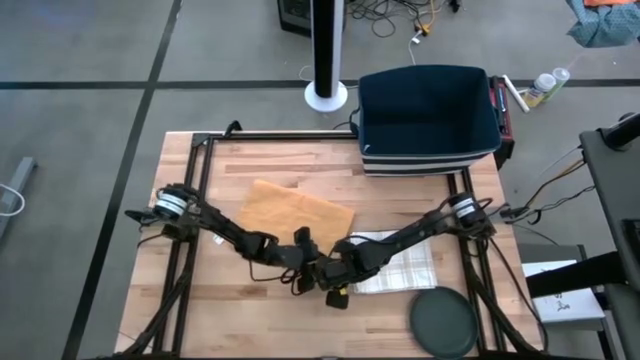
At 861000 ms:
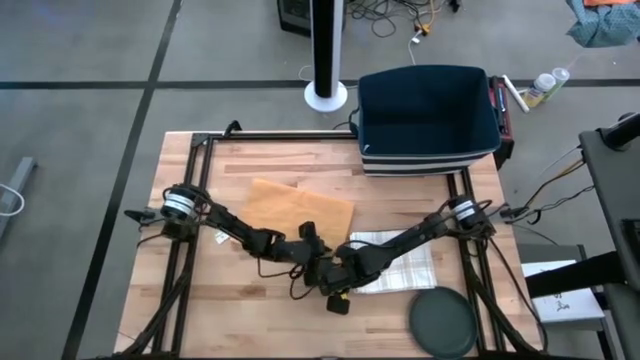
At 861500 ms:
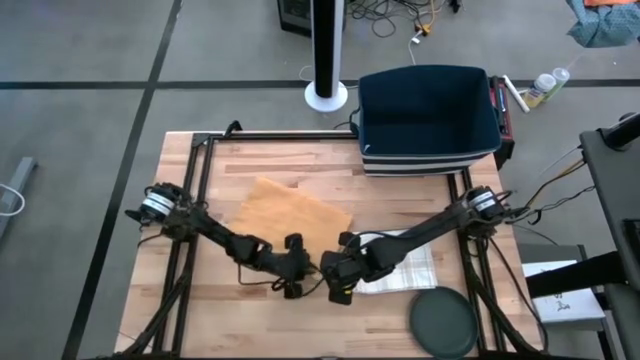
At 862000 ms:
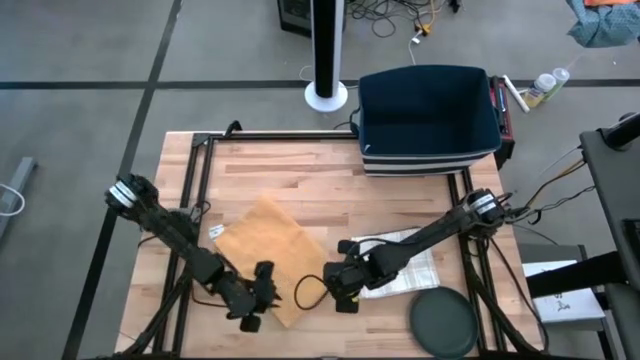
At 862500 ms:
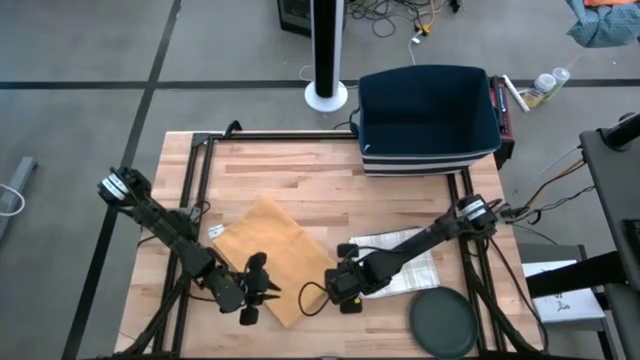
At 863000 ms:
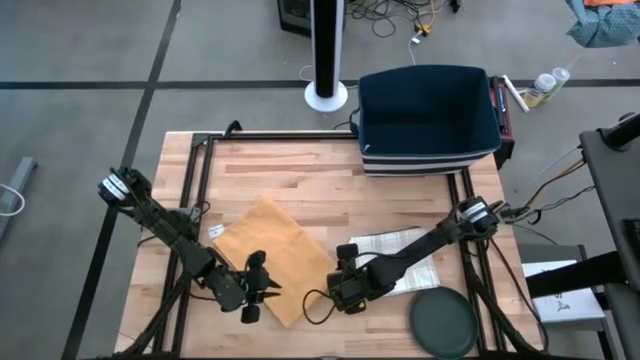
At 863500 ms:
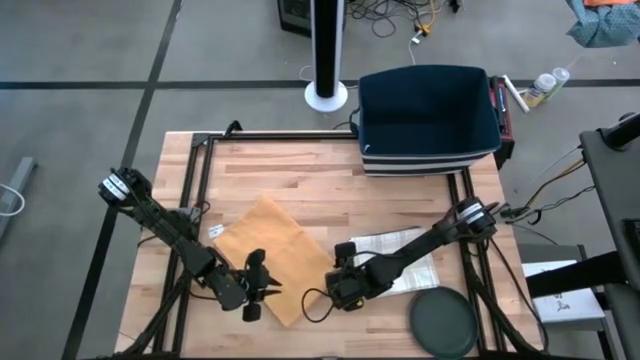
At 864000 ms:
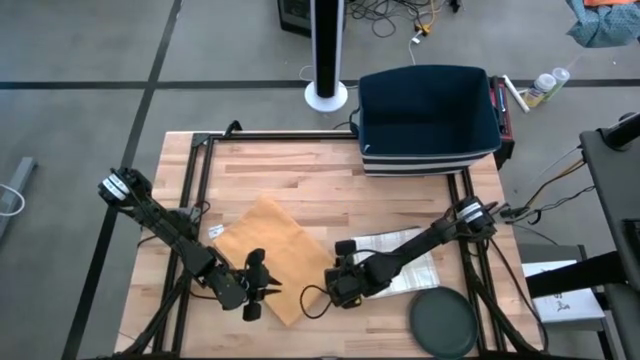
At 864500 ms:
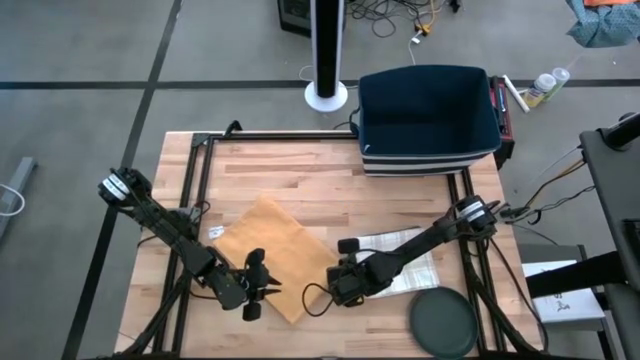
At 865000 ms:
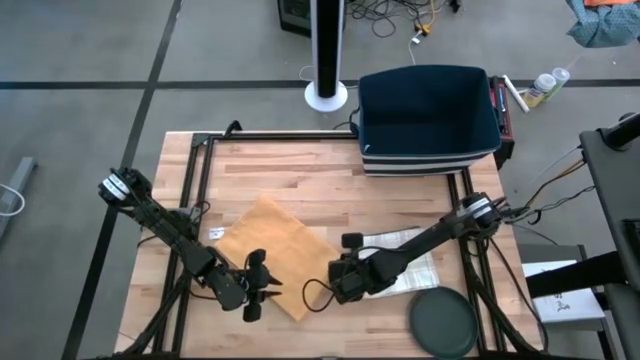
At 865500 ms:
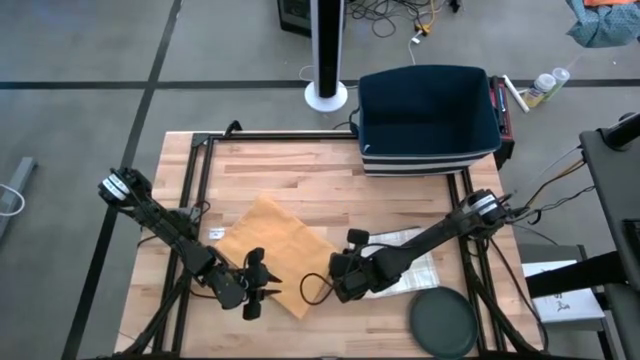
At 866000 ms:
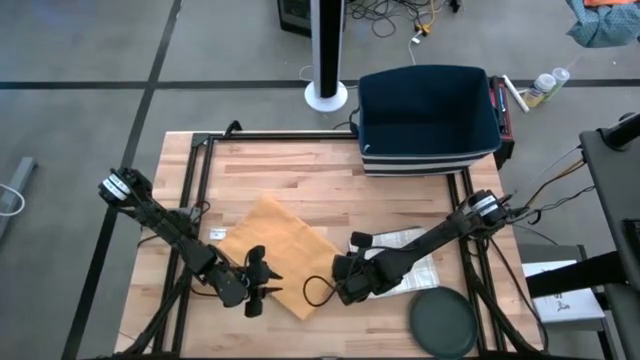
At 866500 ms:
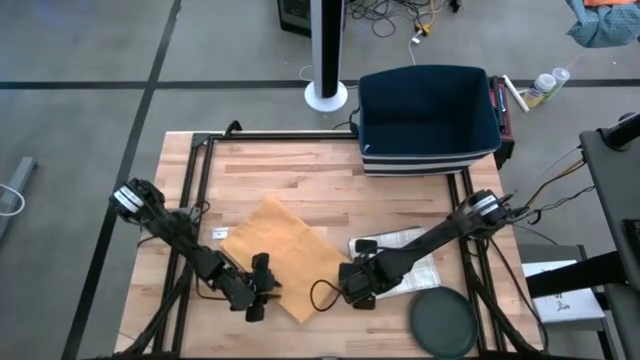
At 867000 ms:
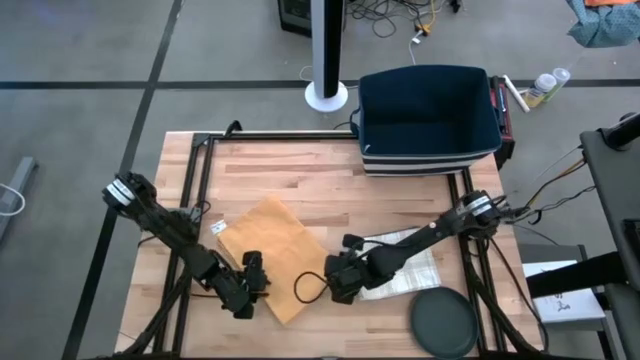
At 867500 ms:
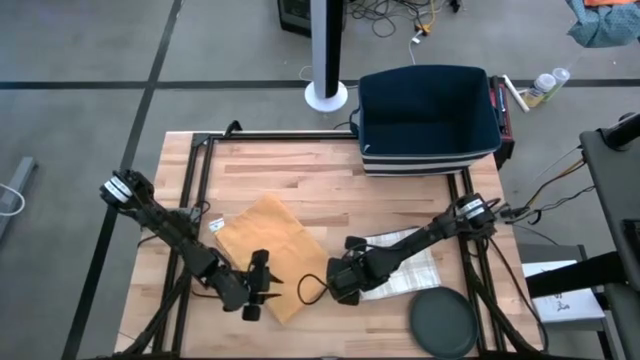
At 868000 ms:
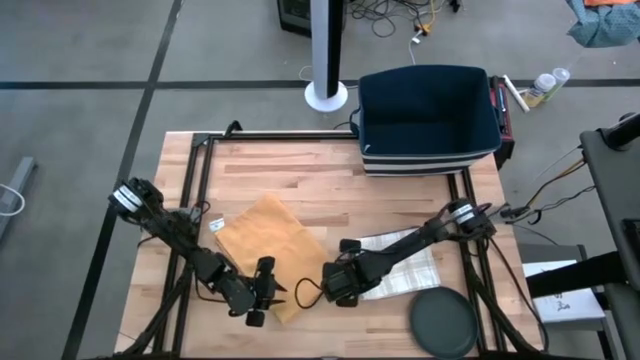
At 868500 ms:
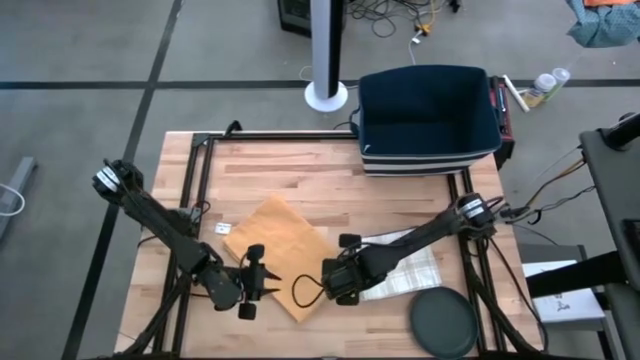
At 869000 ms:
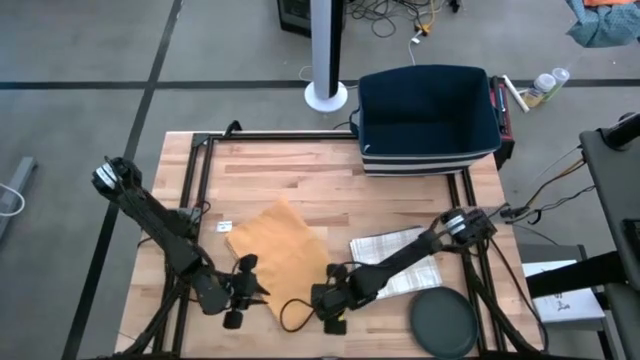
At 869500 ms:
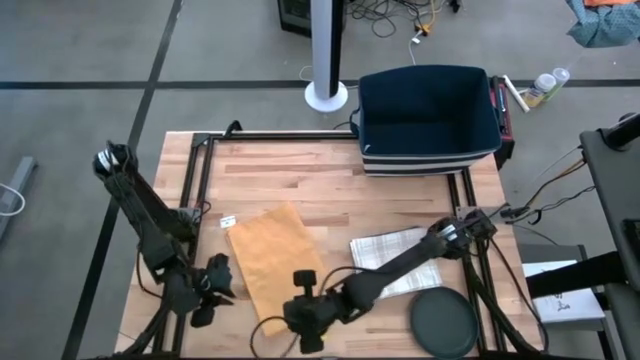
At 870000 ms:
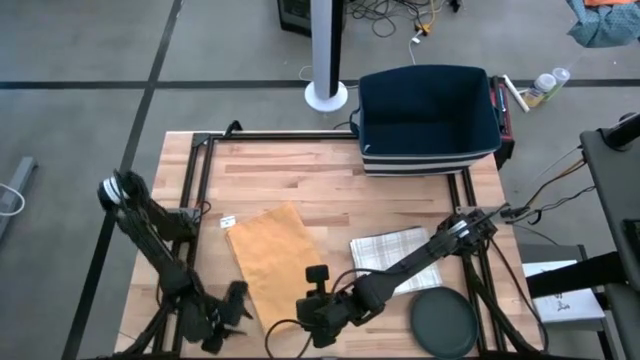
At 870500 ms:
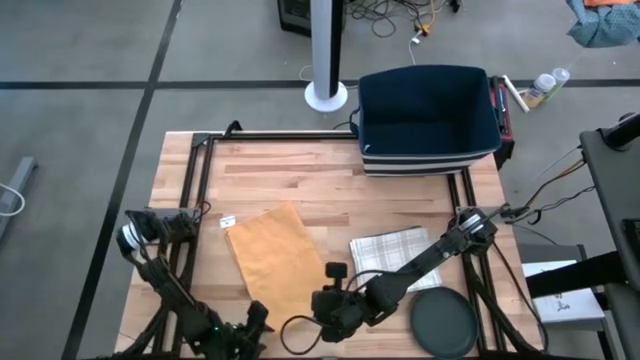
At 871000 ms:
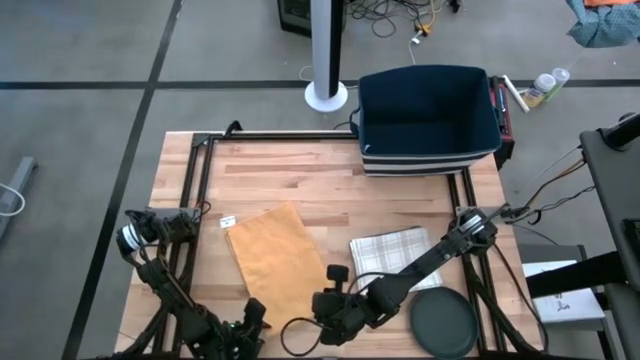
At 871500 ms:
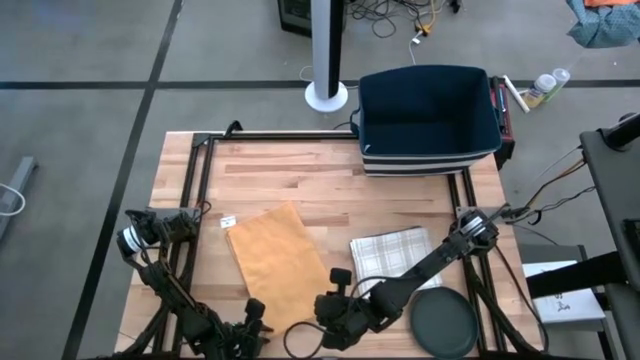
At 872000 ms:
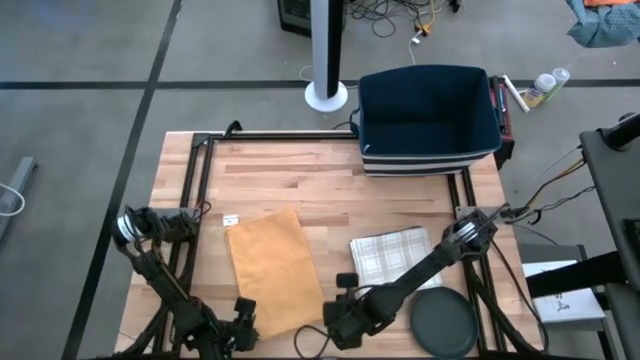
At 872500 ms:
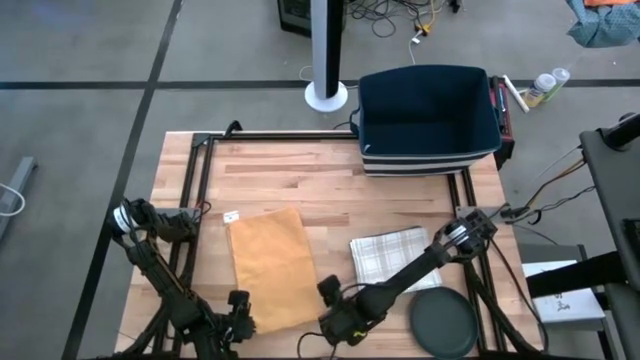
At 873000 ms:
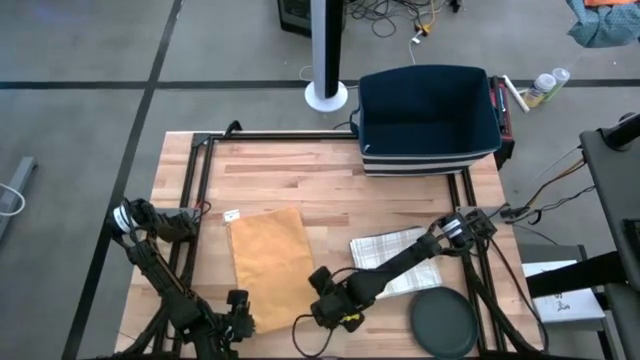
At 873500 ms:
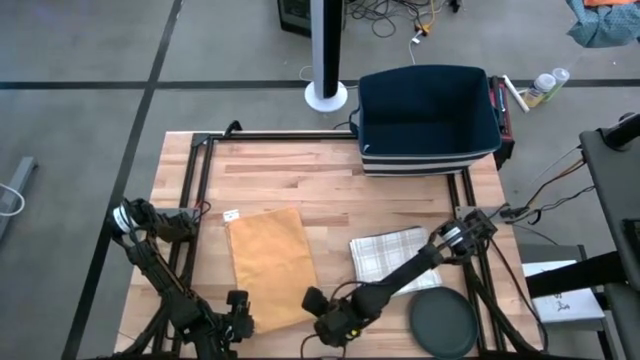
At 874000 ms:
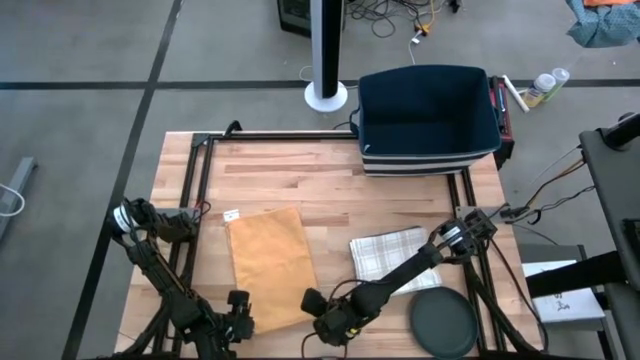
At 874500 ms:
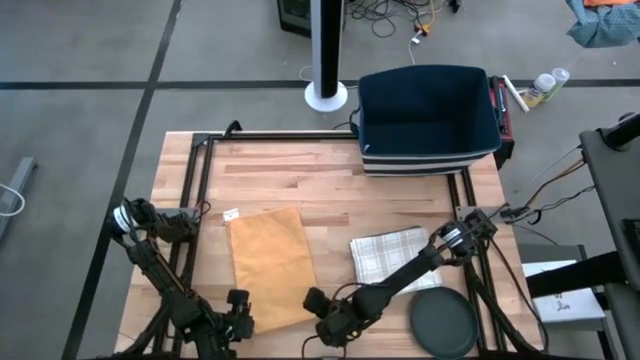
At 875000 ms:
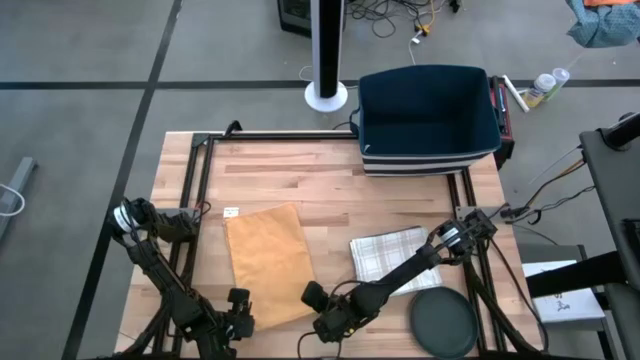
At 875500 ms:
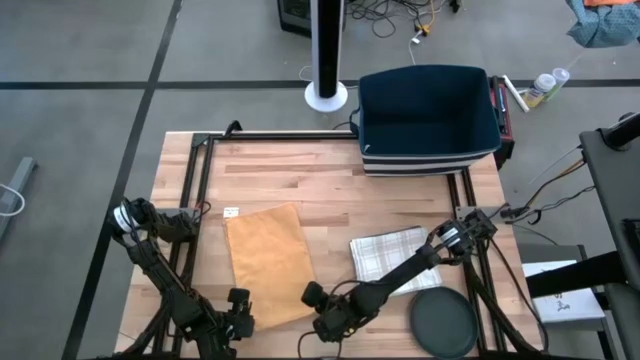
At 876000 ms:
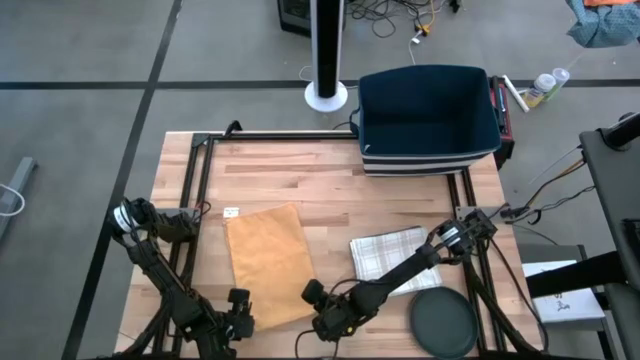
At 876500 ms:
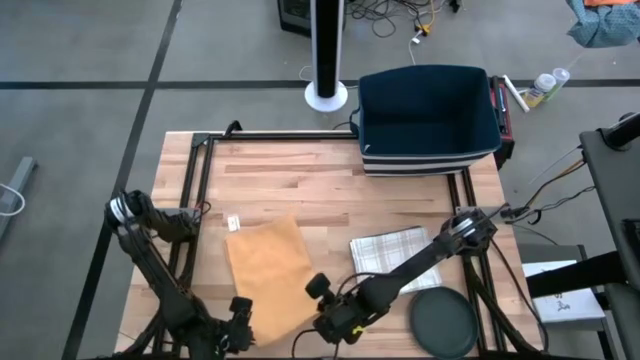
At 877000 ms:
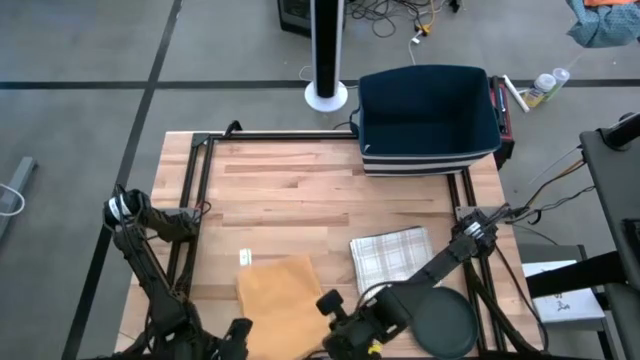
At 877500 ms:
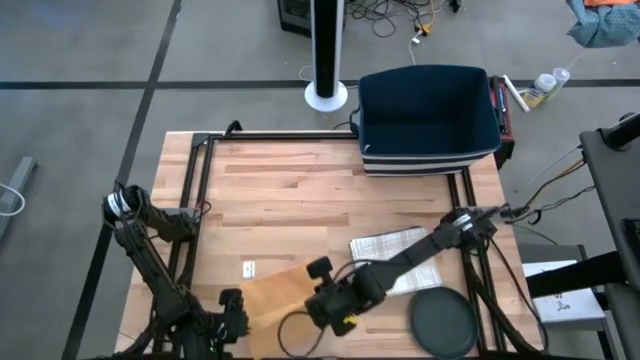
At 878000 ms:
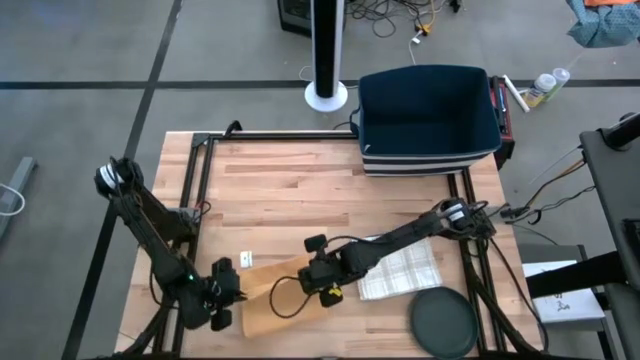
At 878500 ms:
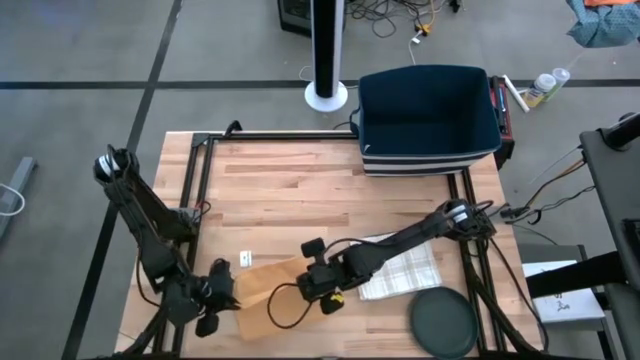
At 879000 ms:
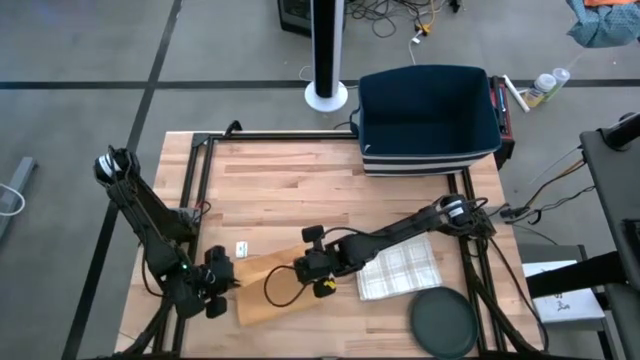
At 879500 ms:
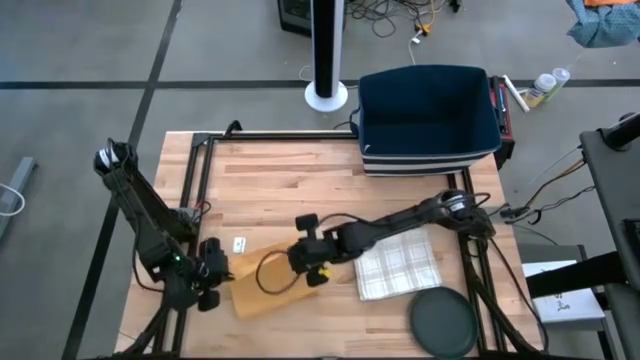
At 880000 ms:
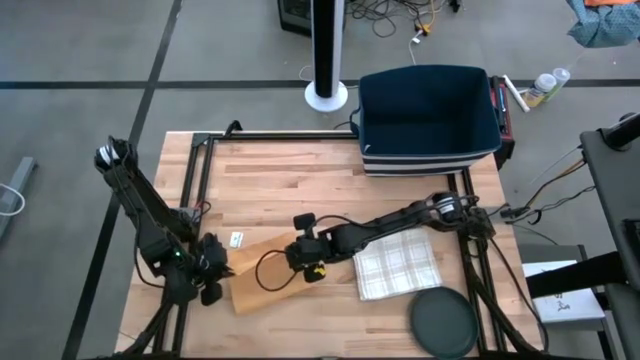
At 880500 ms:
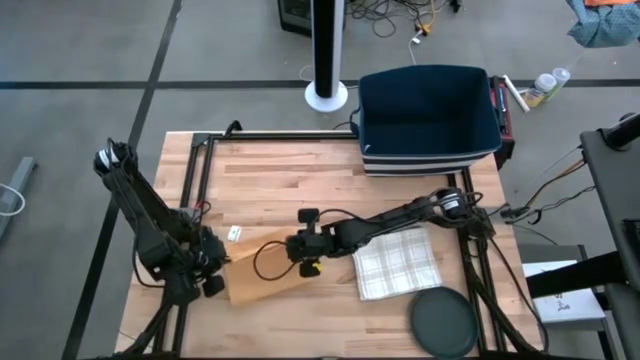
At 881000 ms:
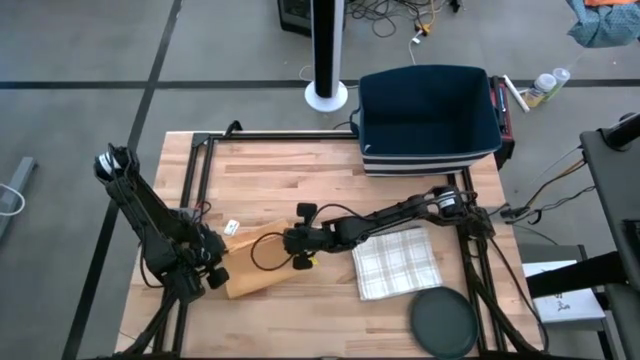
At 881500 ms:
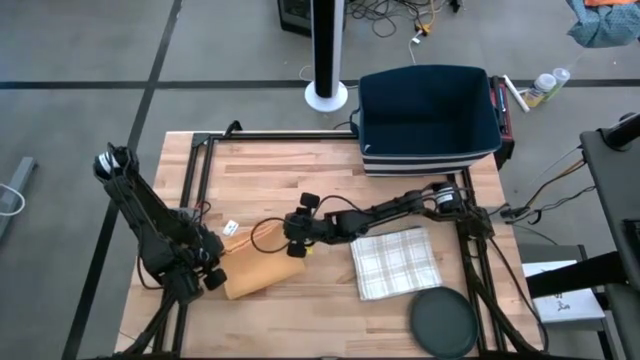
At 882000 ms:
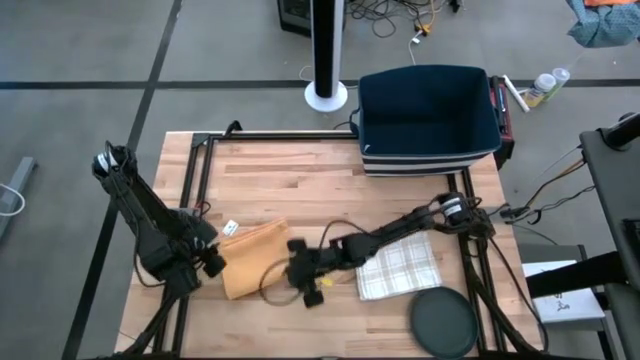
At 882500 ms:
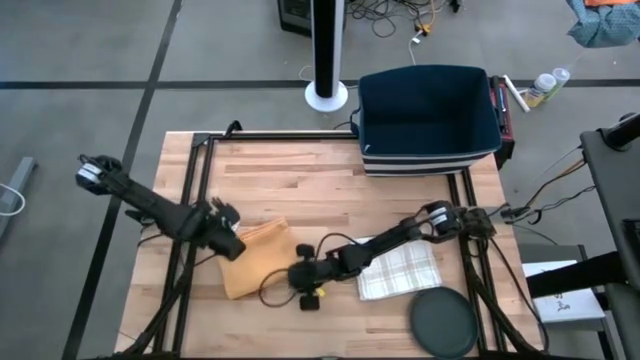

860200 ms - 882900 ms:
Task: Fold kitchen towel into neat rectangle
Fold the orange towel
